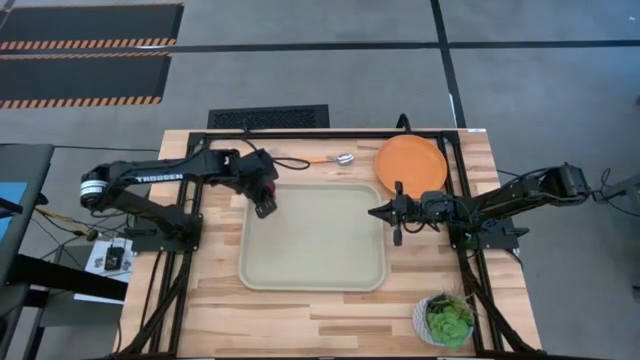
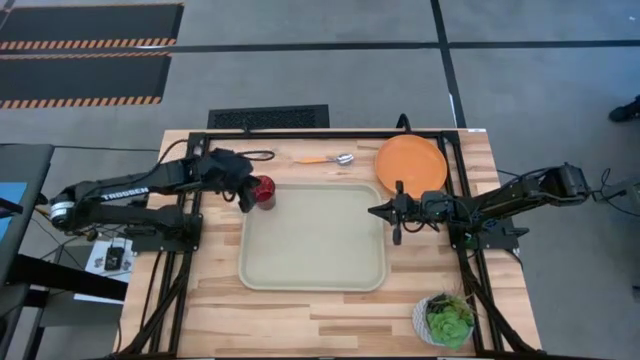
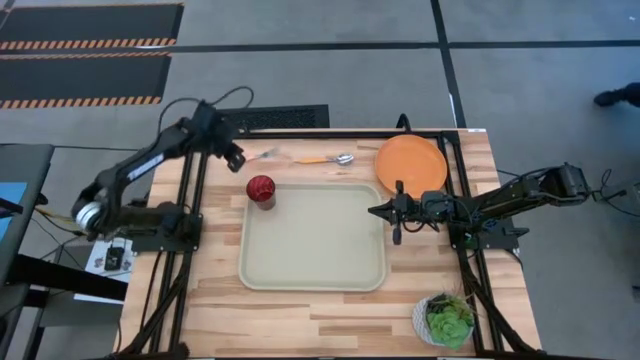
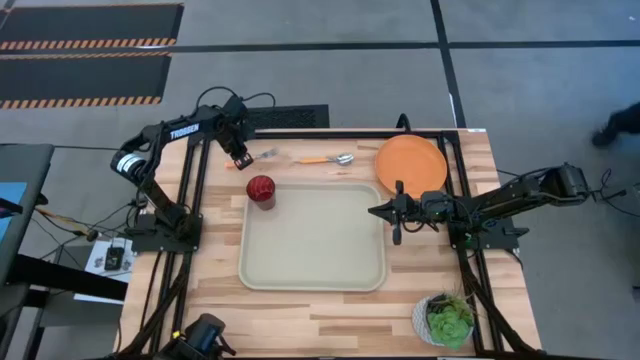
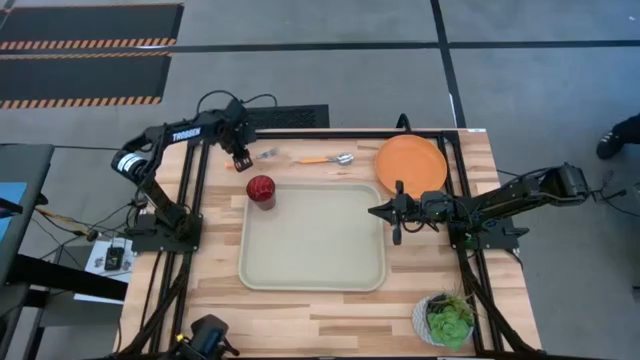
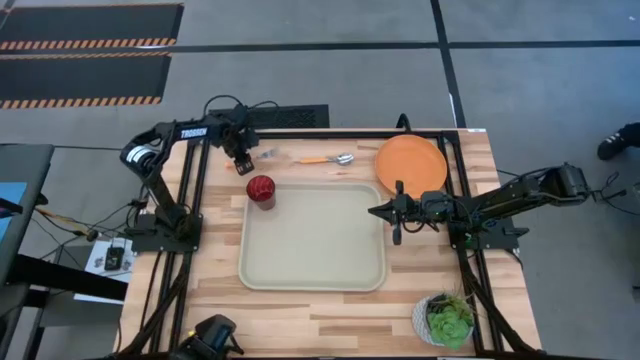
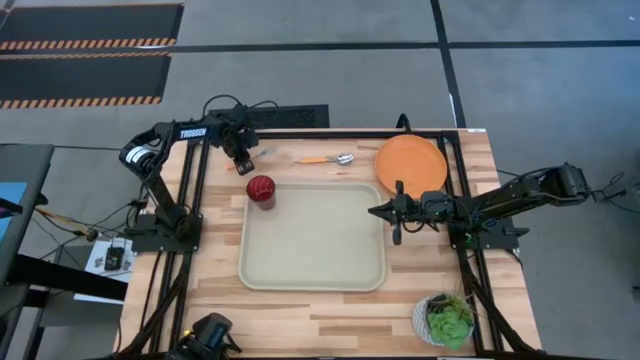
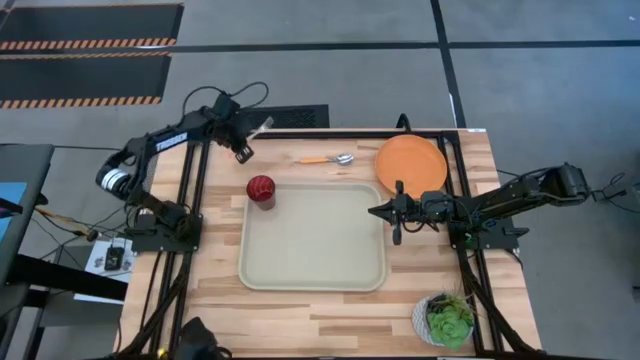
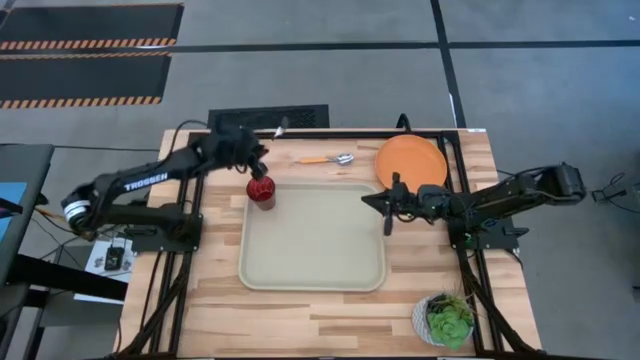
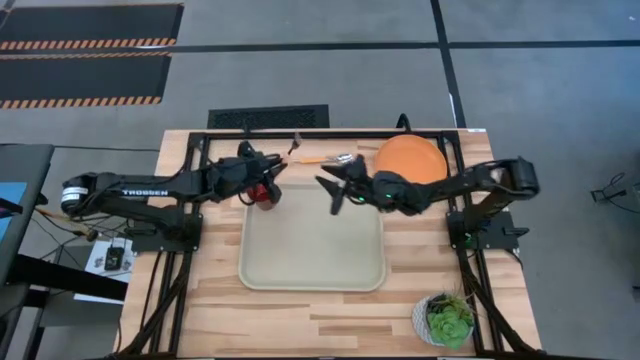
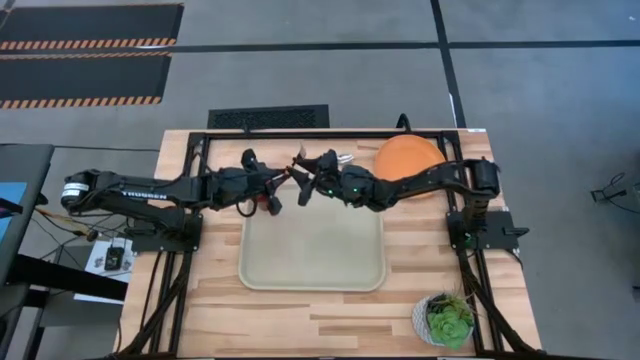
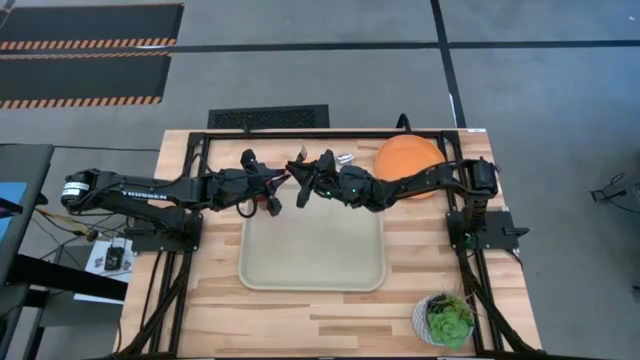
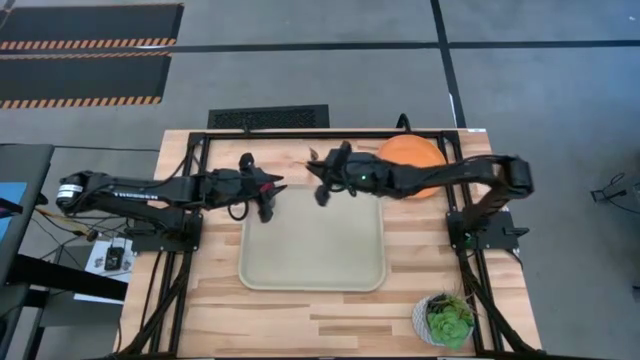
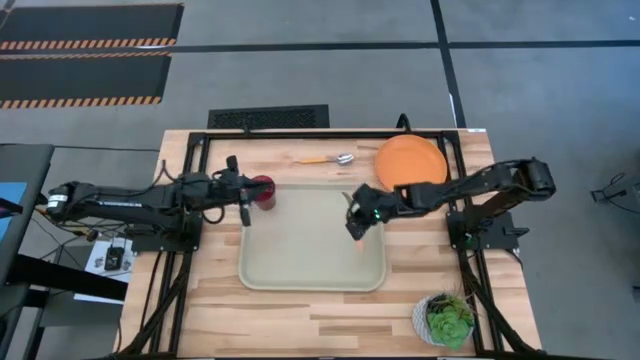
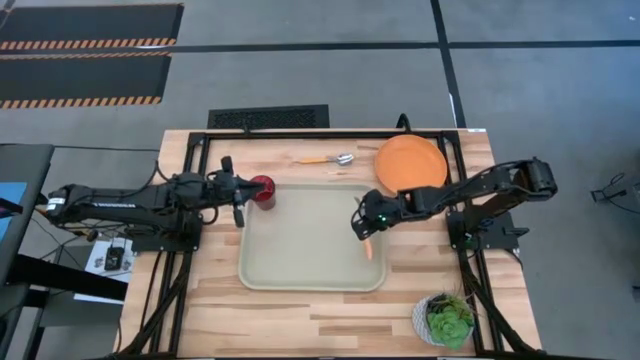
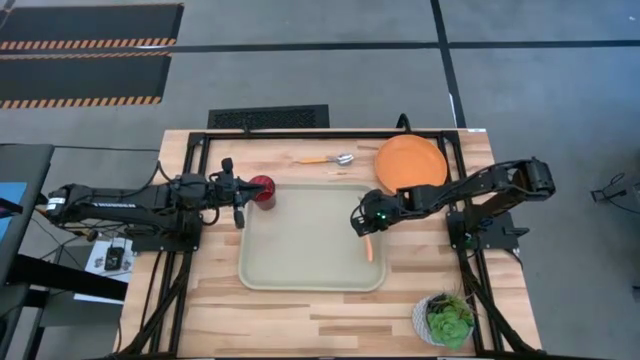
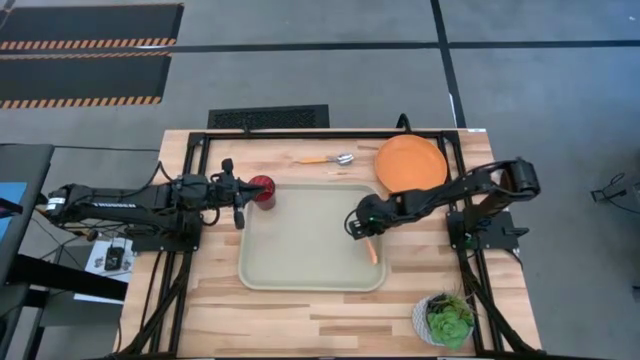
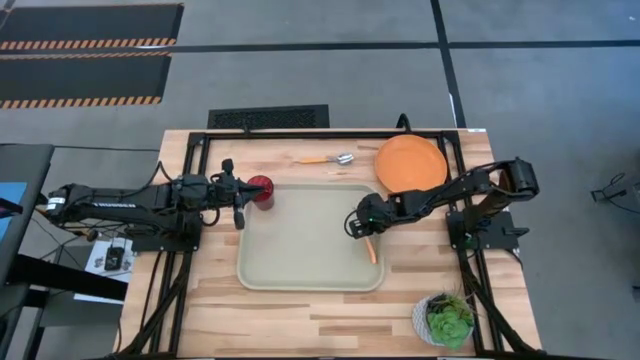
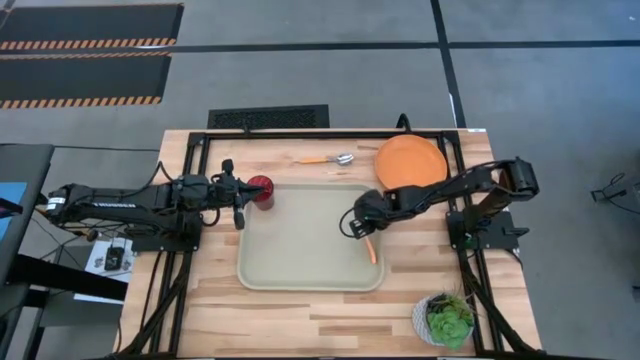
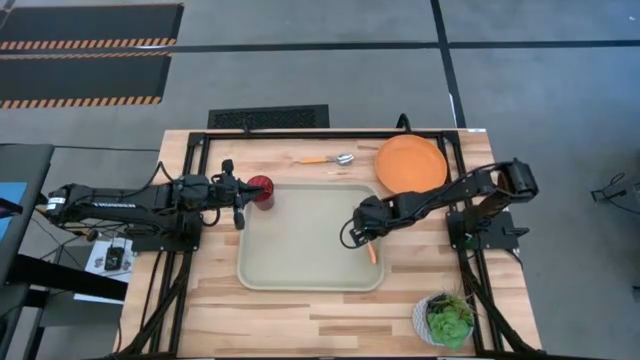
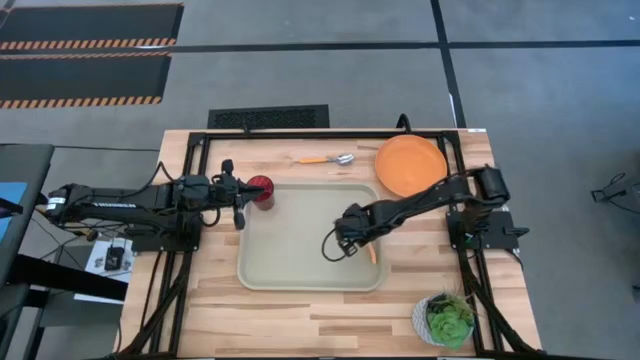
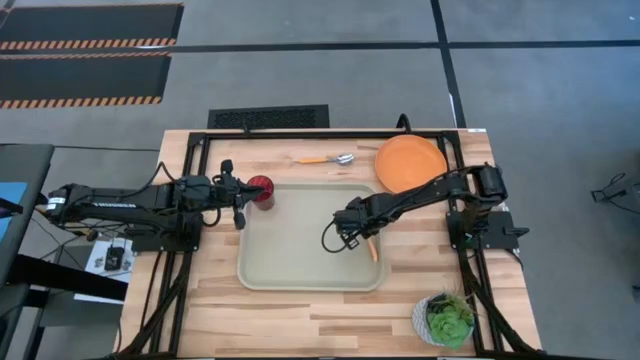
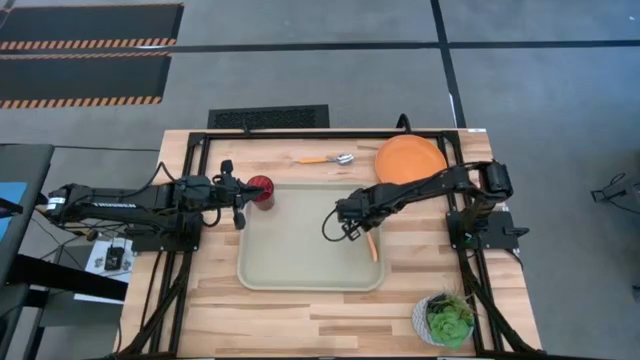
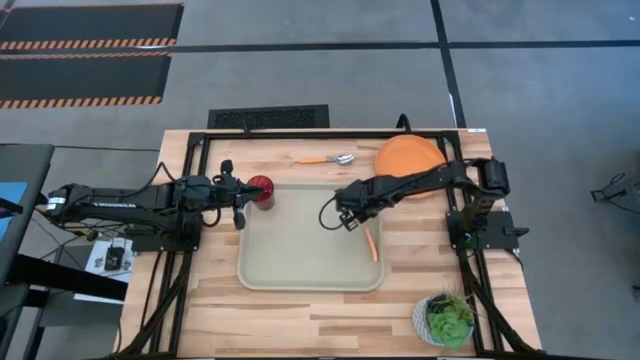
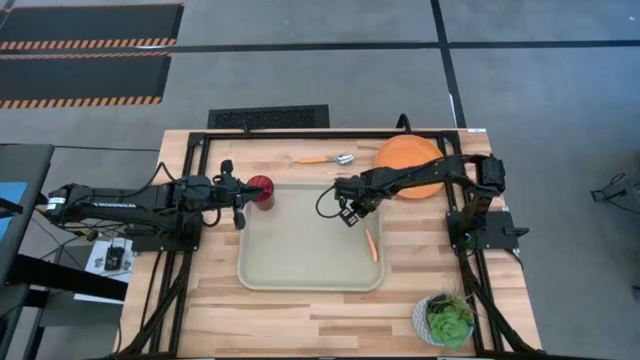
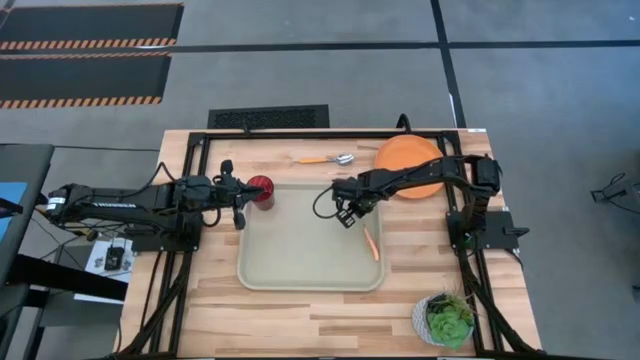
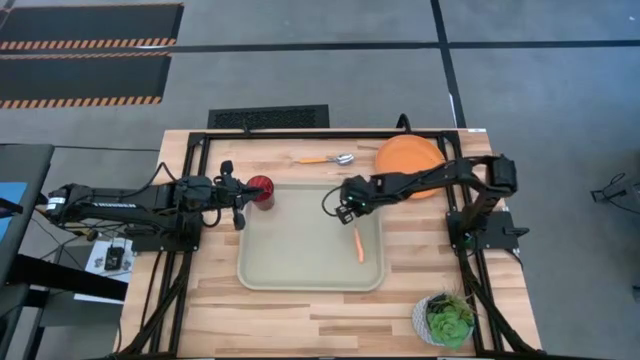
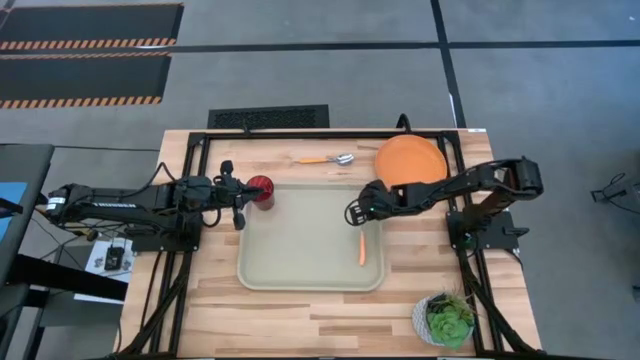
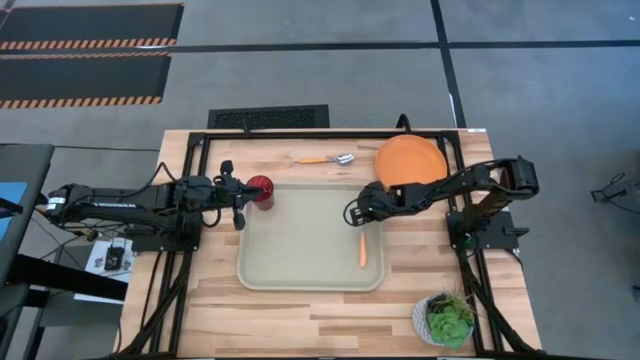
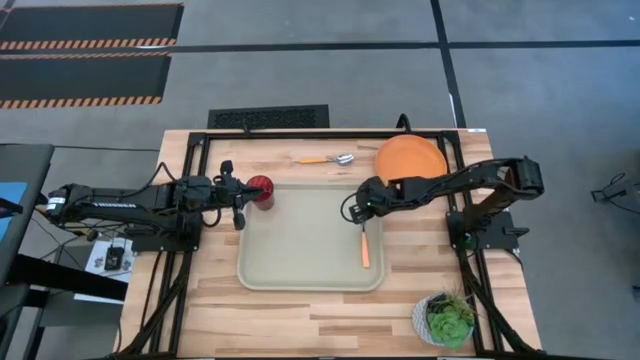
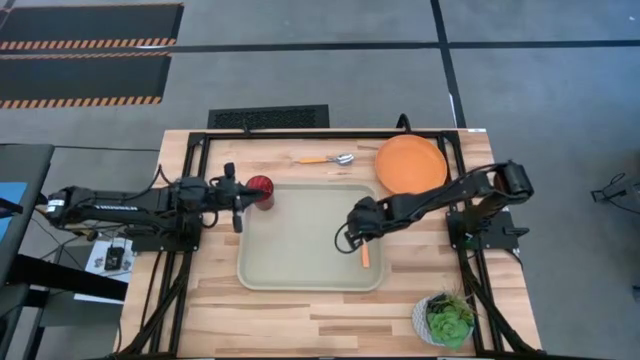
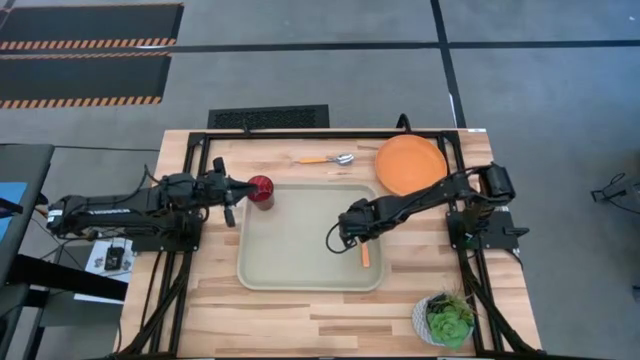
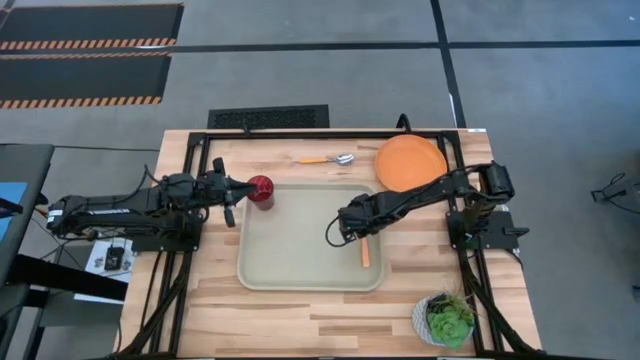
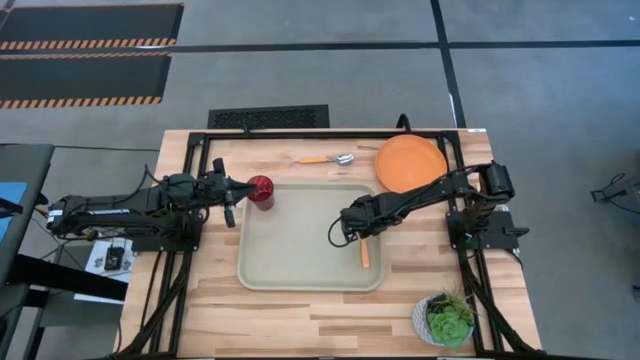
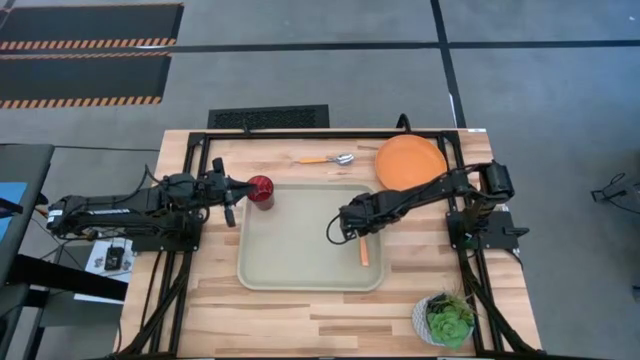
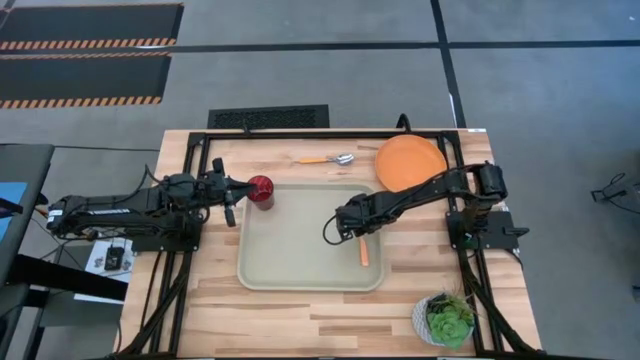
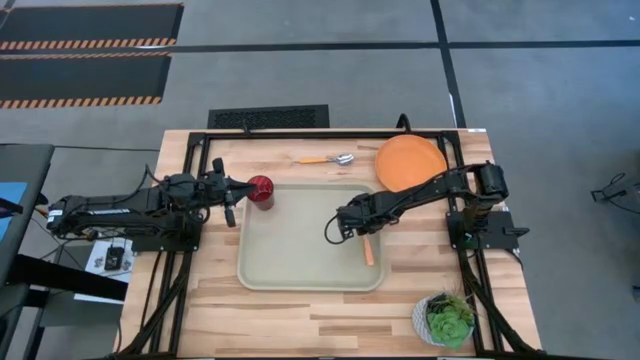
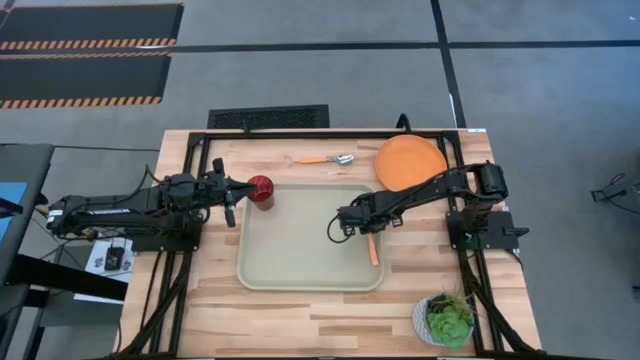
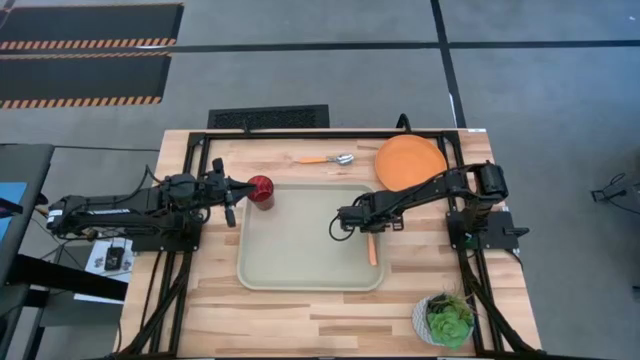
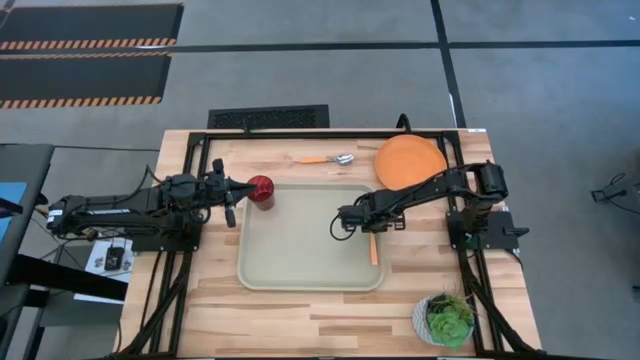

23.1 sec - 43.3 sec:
Task: Pick and place plate/cup/fork/spoon on tray
Put the orange fork on the right side of the gray serving tray
